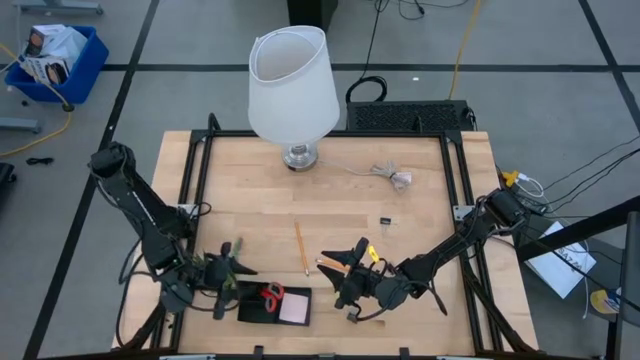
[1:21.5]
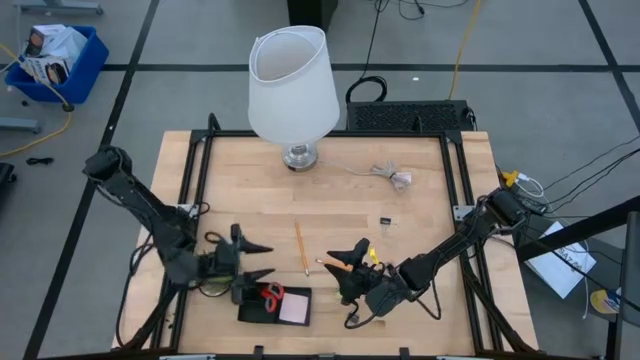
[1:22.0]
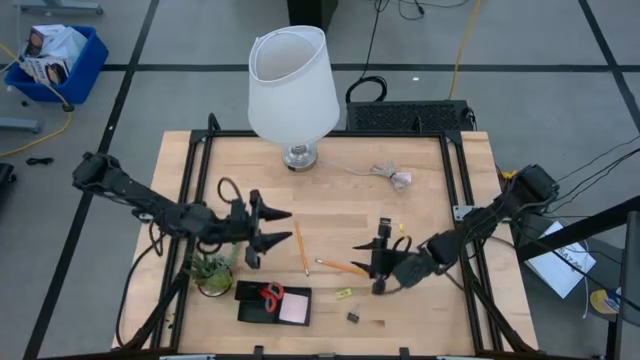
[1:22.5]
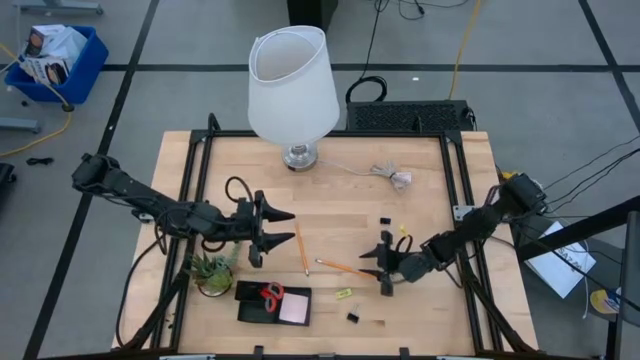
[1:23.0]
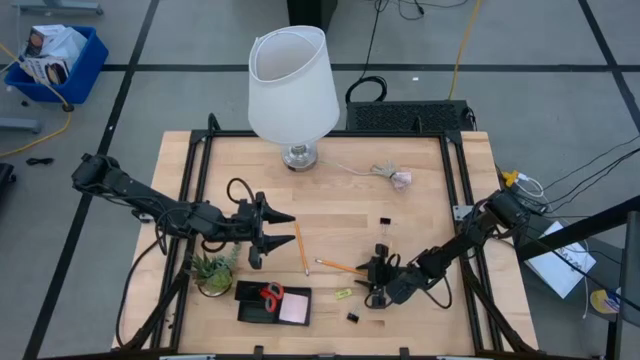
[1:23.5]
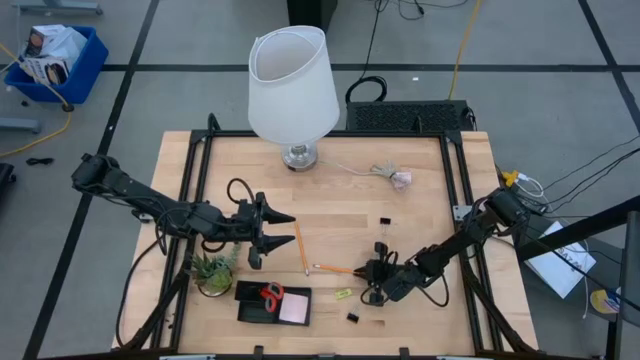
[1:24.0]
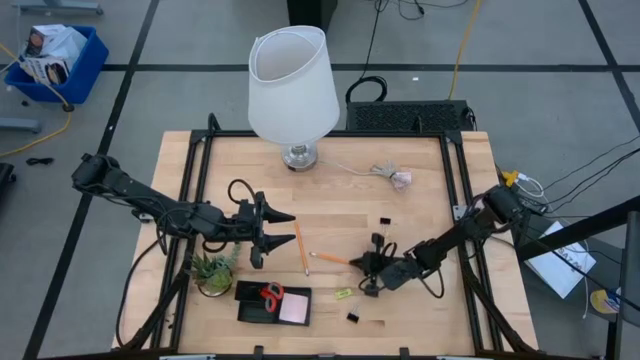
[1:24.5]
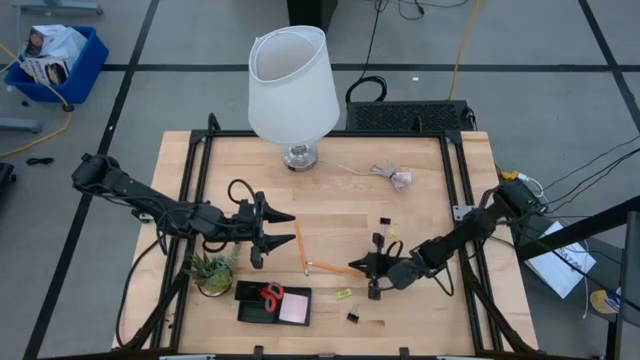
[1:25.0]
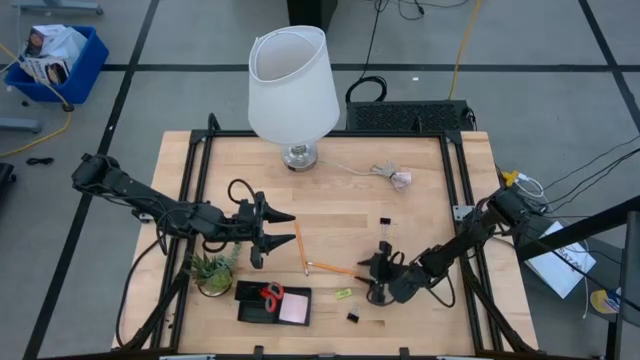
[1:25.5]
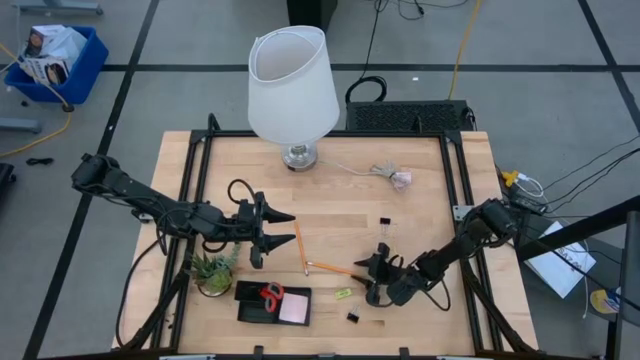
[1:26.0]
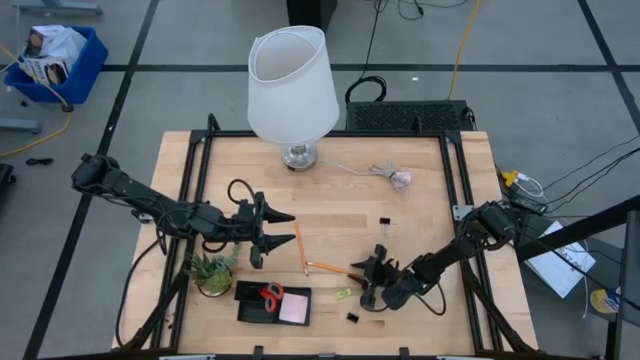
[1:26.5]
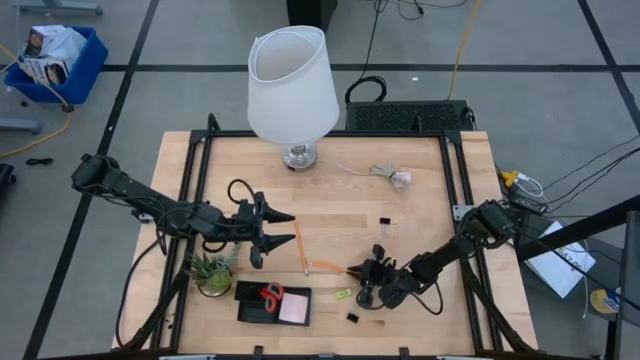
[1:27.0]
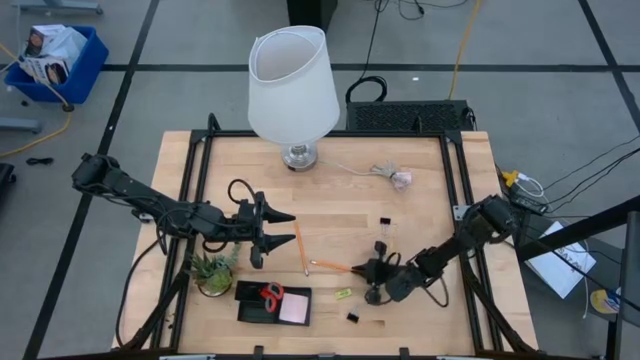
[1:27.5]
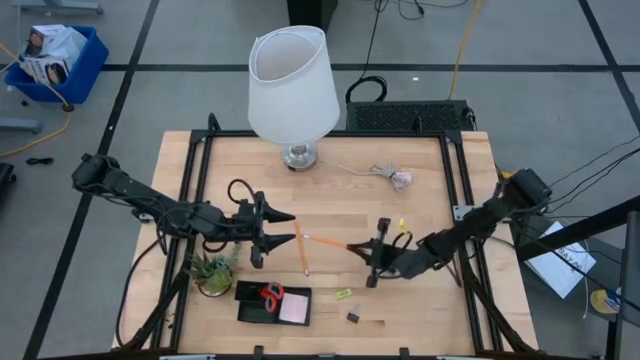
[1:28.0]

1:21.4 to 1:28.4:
Task: Pick and place office supplies into organizer
Put the right yellow pencil into the black desk organizer

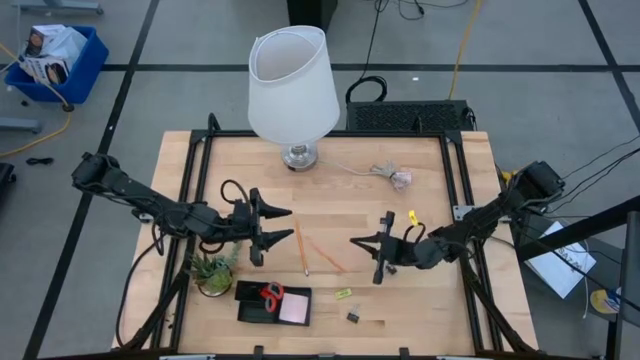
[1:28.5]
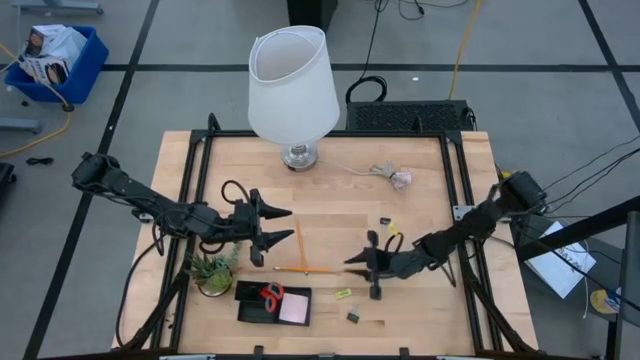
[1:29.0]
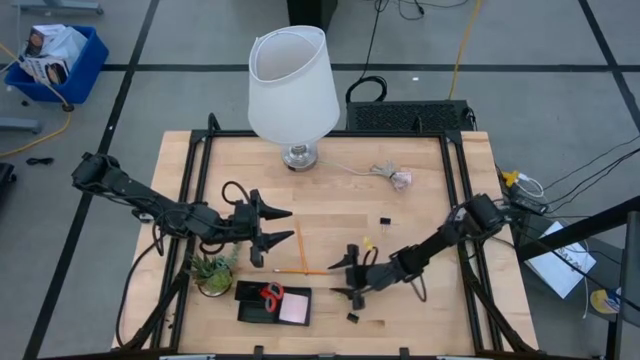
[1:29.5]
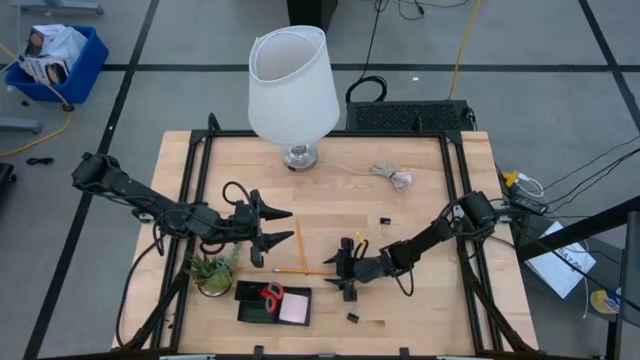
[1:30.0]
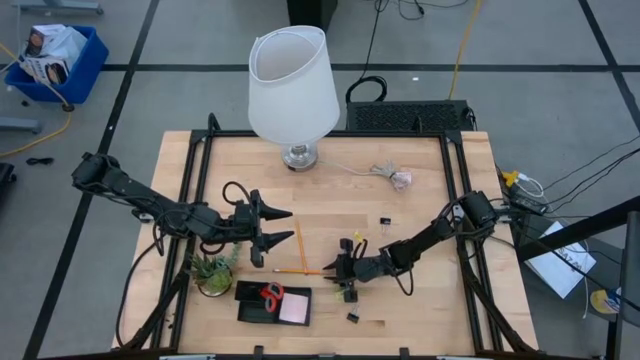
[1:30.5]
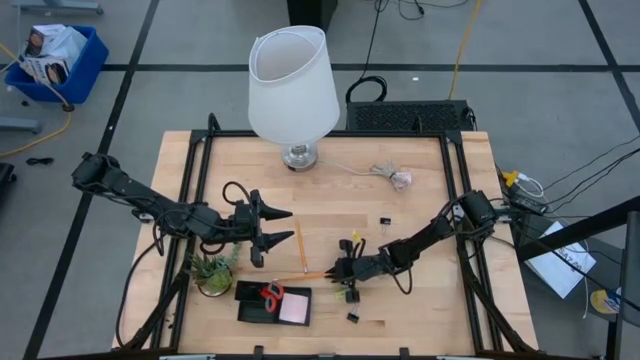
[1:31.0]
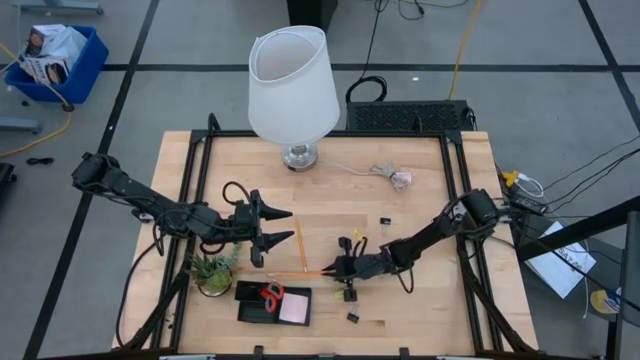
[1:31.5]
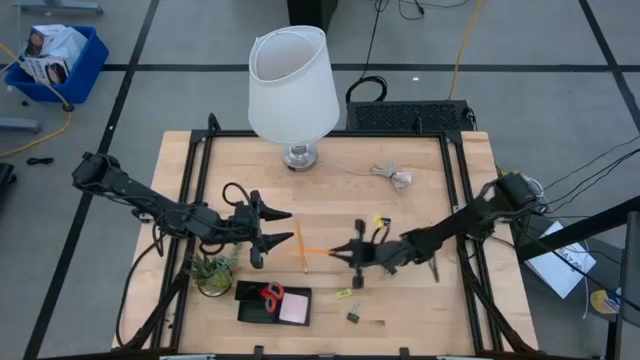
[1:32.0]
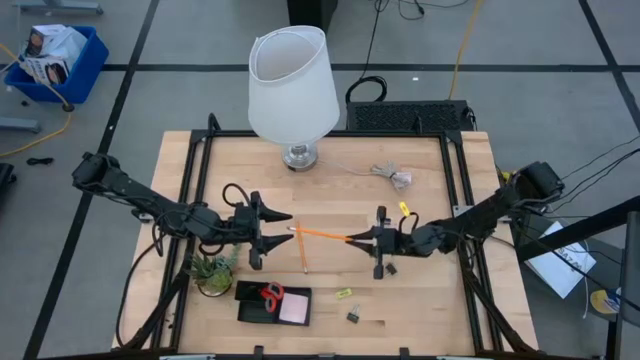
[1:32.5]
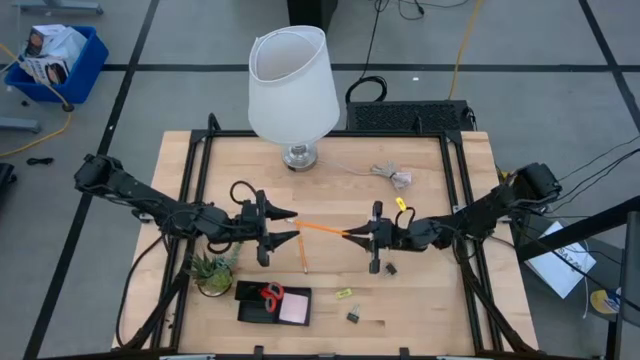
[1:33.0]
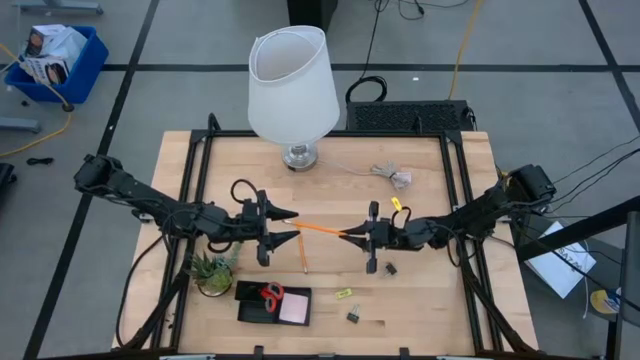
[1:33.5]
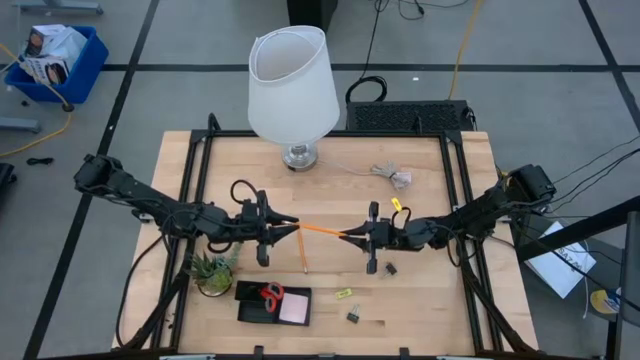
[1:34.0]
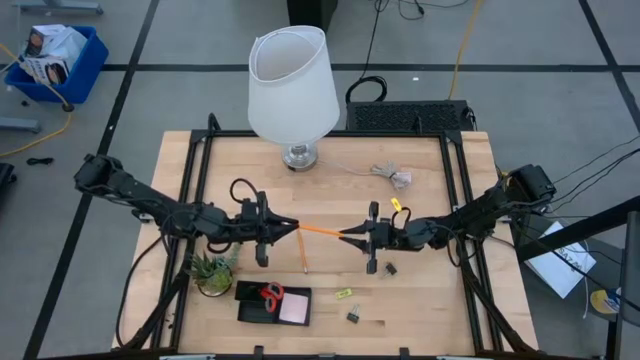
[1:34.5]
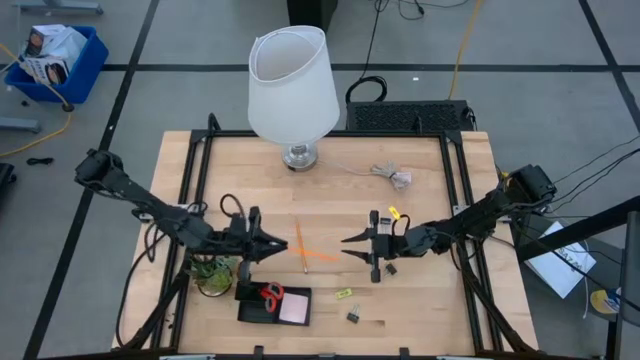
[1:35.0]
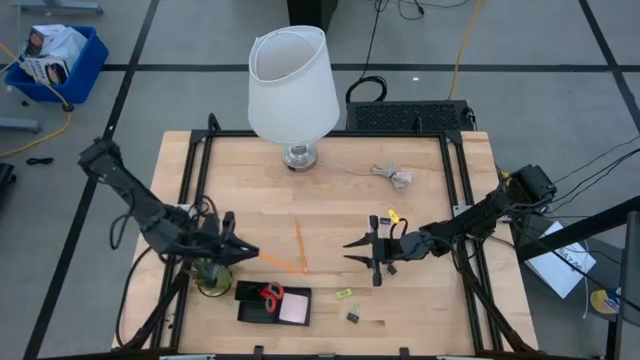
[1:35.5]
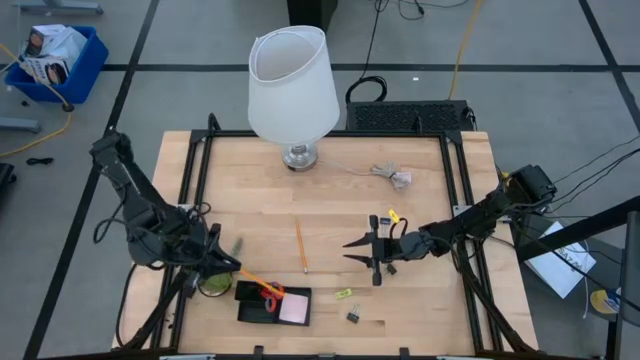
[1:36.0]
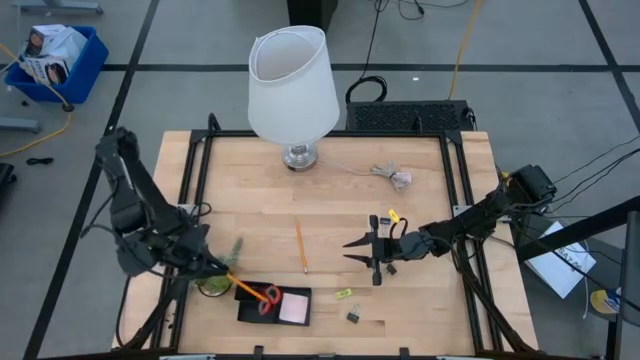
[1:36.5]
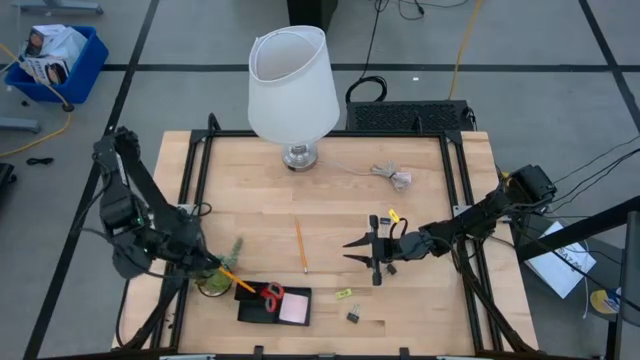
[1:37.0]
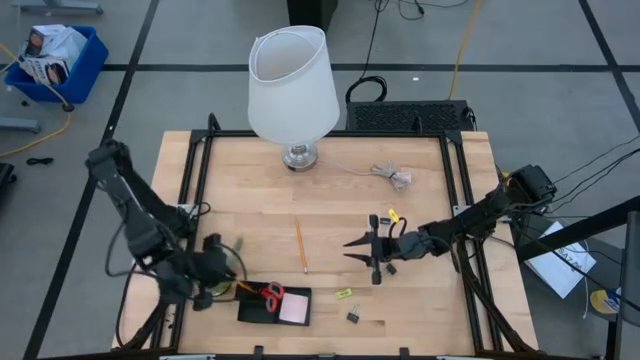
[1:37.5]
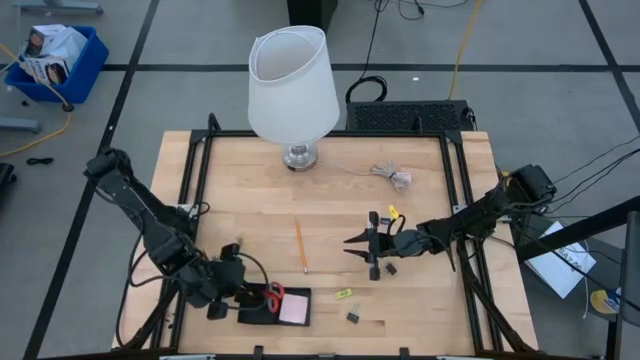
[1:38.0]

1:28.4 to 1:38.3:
Put the yellow pencil into the black desk organizer

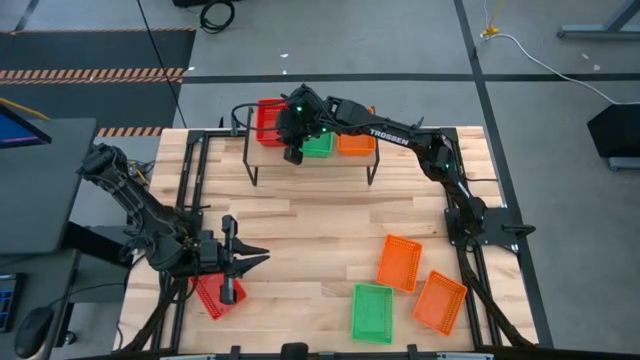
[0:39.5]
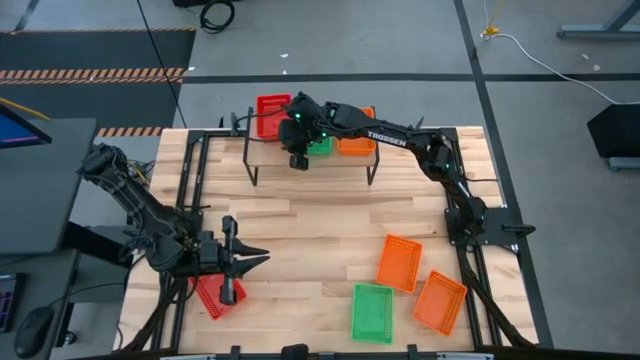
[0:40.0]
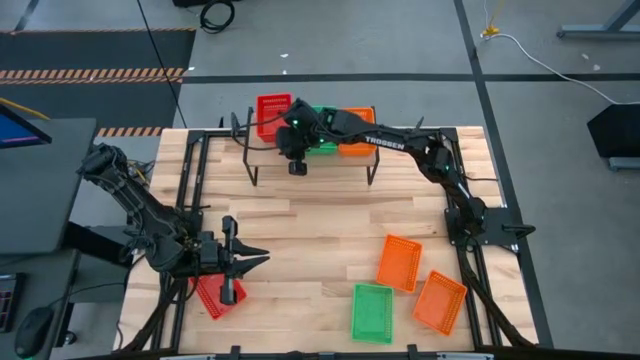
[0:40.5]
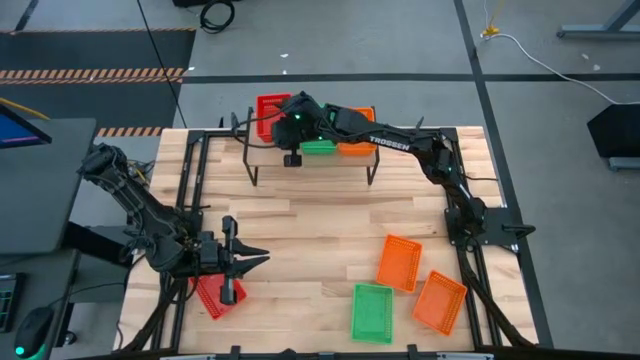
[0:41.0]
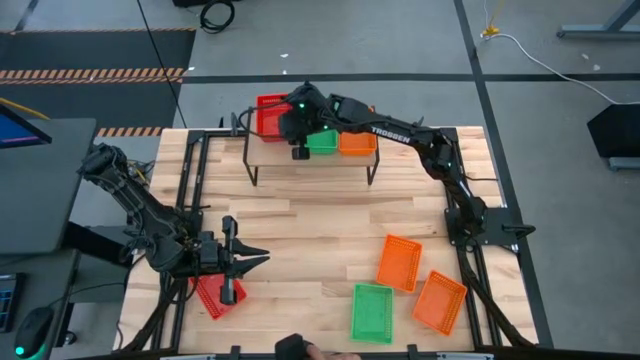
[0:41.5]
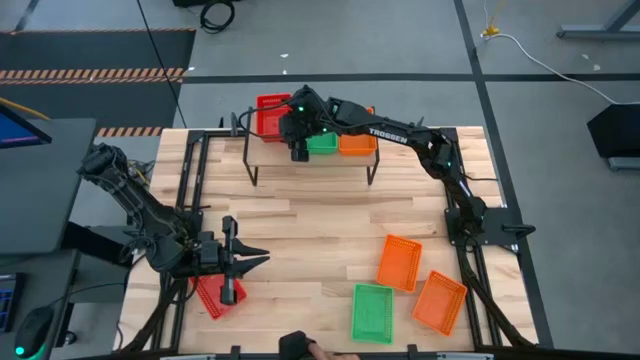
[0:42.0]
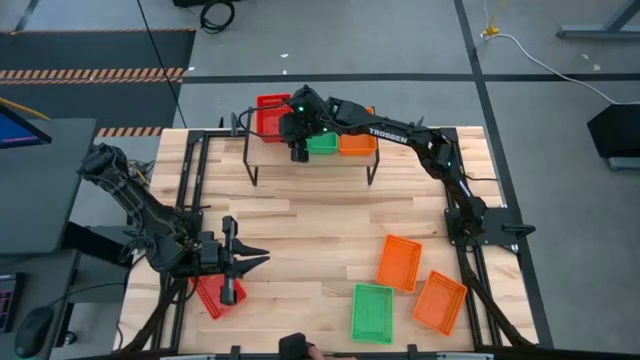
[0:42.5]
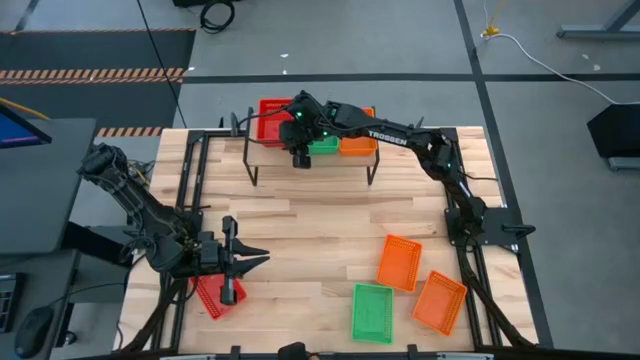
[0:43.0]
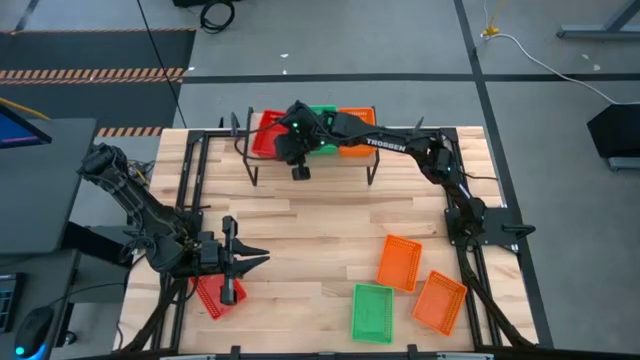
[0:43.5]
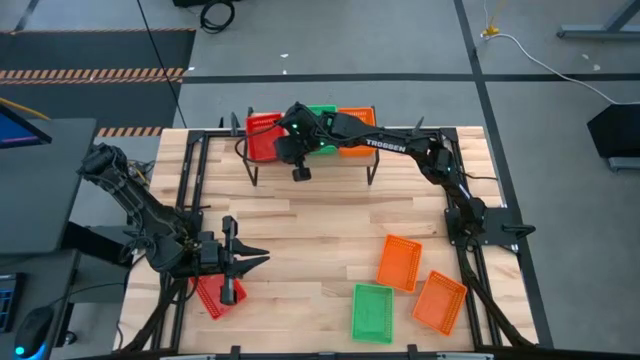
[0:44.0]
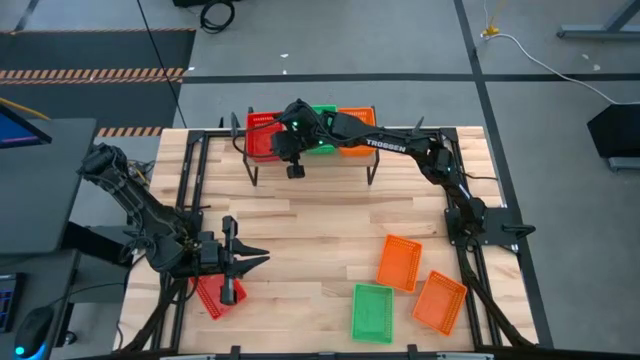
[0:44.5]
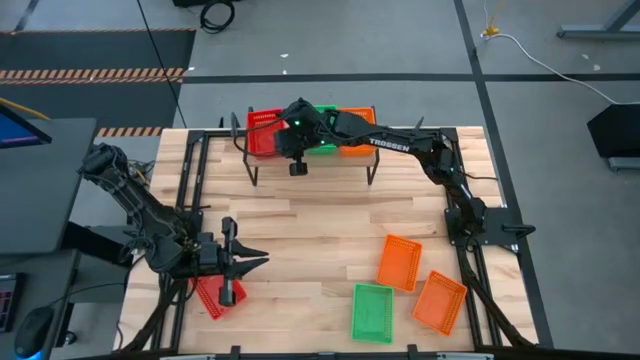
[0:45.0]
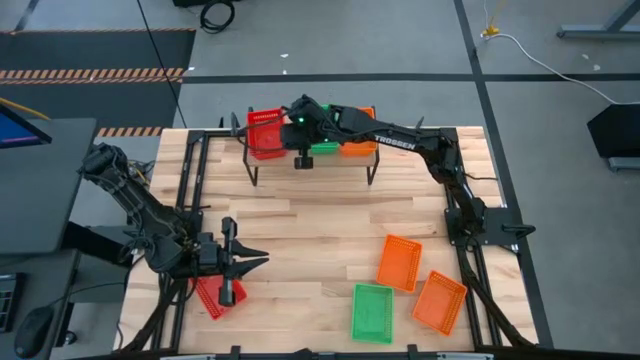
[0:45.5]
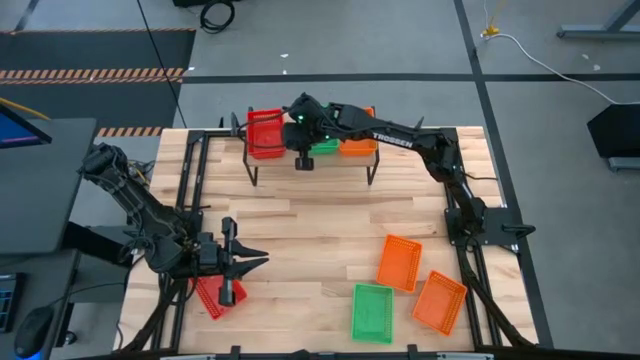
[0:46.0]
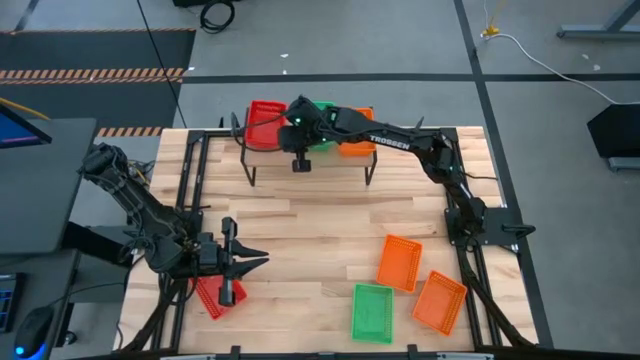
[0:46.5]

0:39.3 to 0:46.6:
Task: Stack baskets on shelf by color
Adjust the stacked red baskets on the shelf
